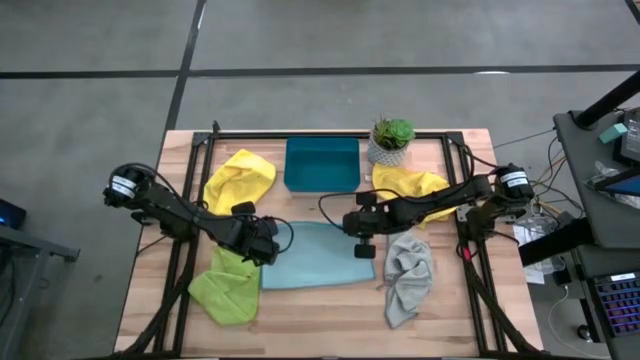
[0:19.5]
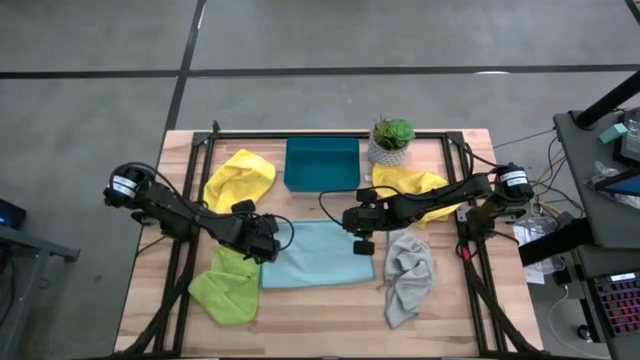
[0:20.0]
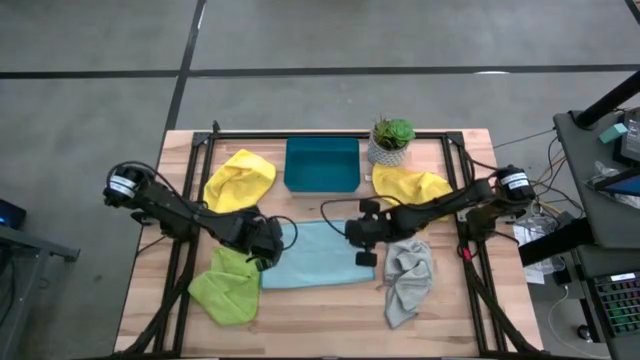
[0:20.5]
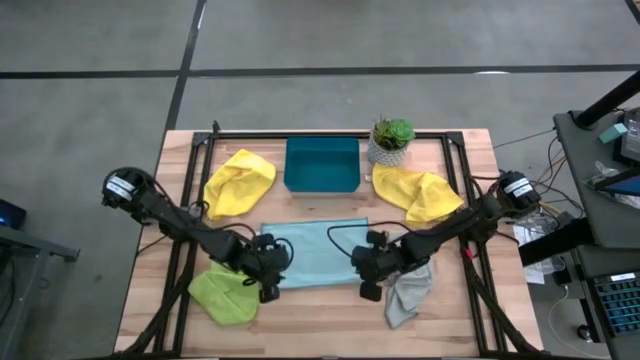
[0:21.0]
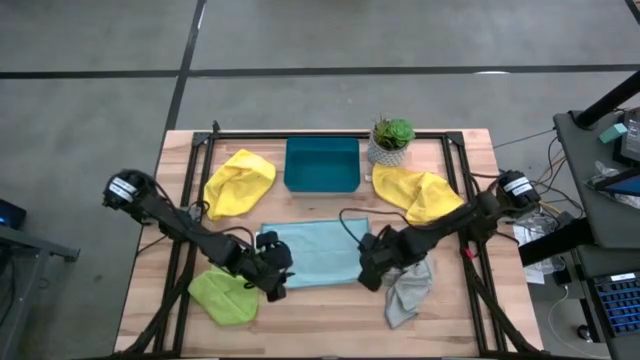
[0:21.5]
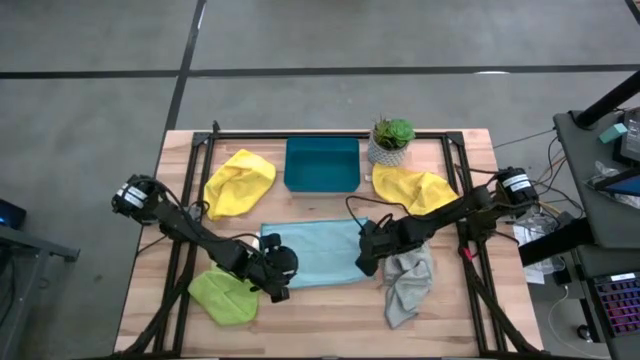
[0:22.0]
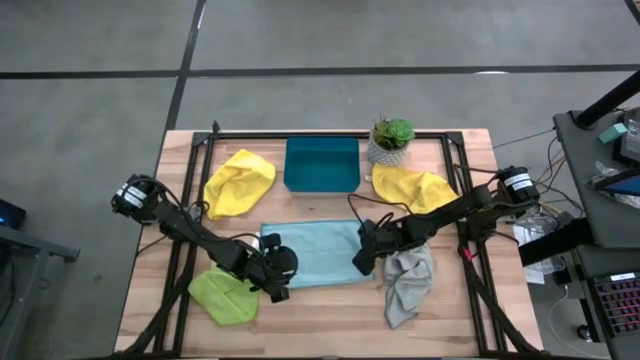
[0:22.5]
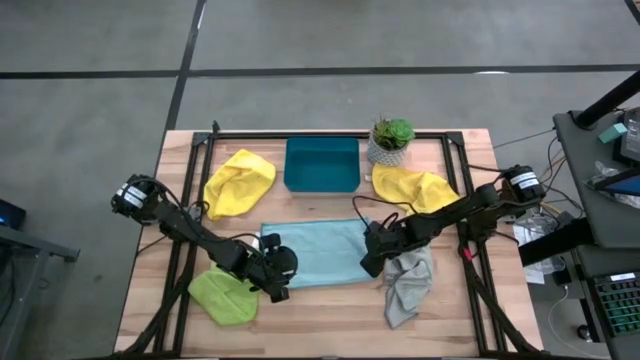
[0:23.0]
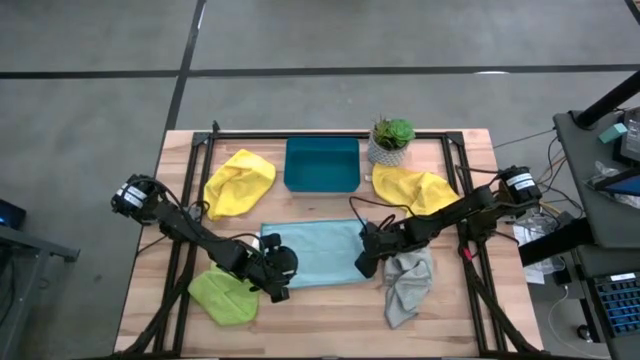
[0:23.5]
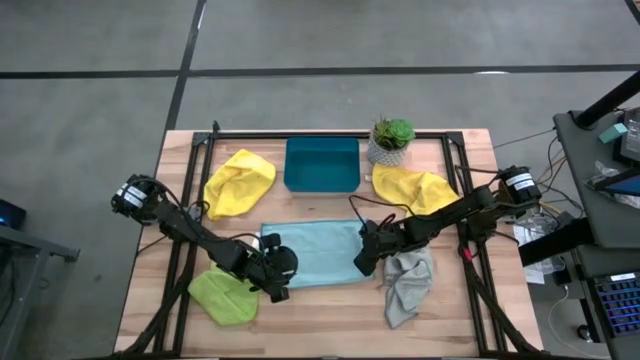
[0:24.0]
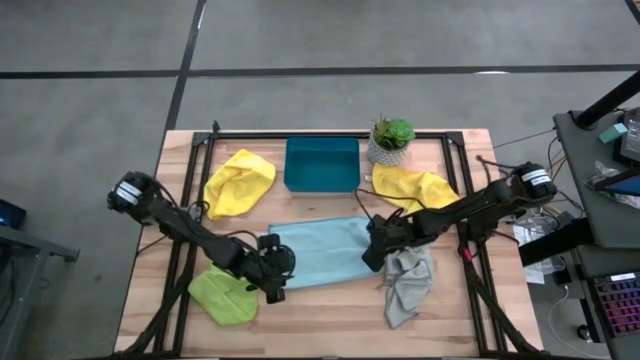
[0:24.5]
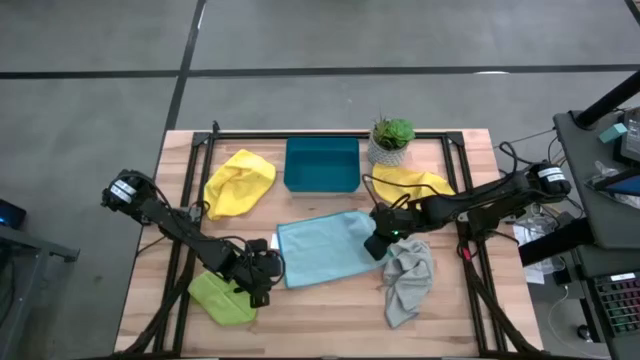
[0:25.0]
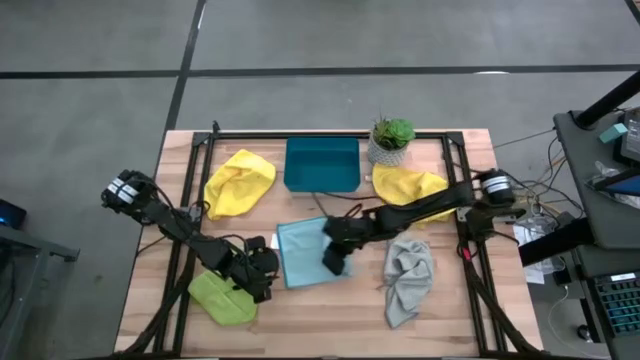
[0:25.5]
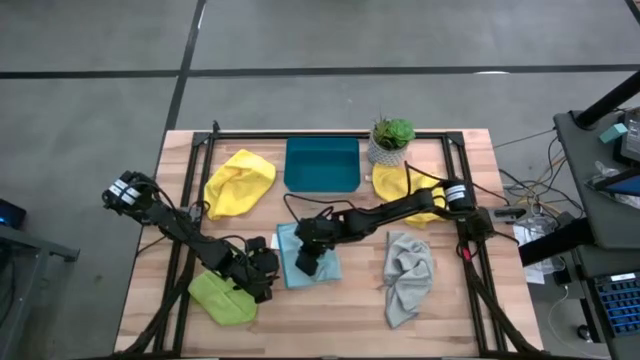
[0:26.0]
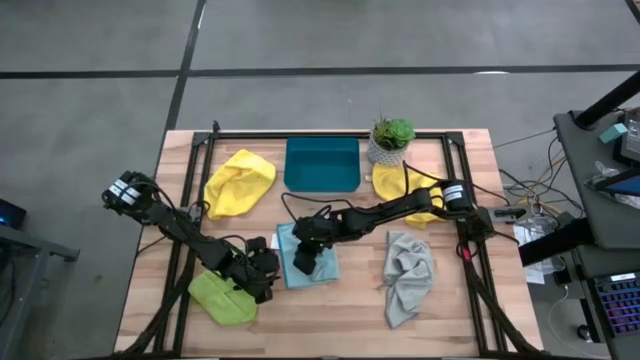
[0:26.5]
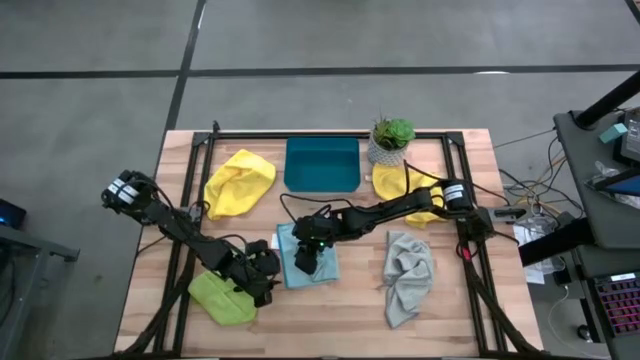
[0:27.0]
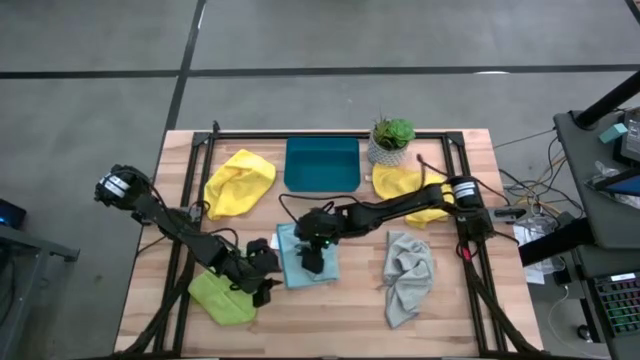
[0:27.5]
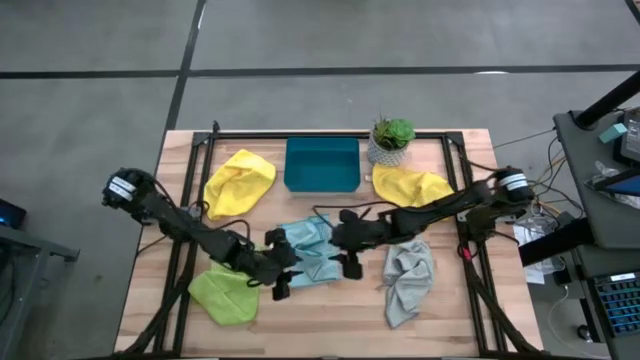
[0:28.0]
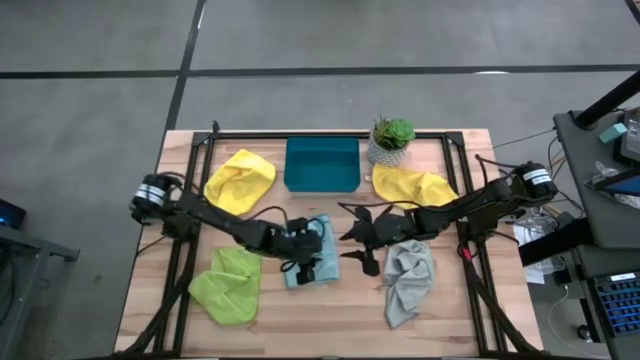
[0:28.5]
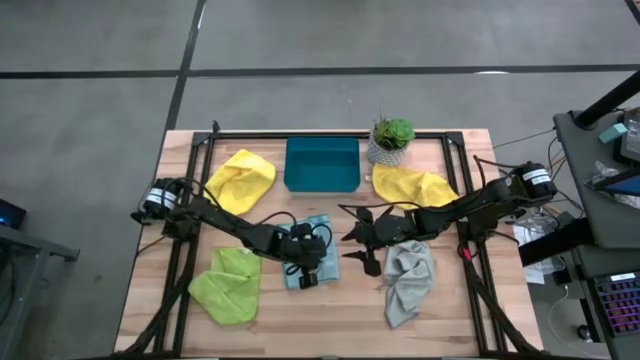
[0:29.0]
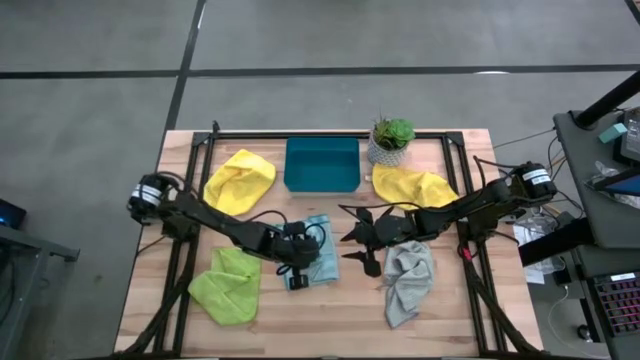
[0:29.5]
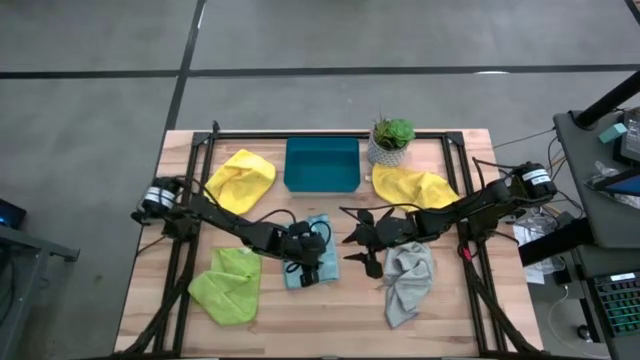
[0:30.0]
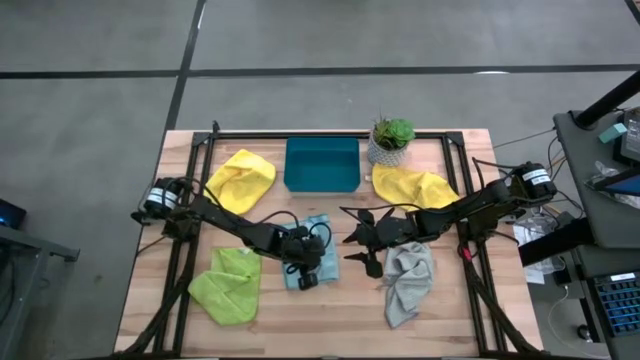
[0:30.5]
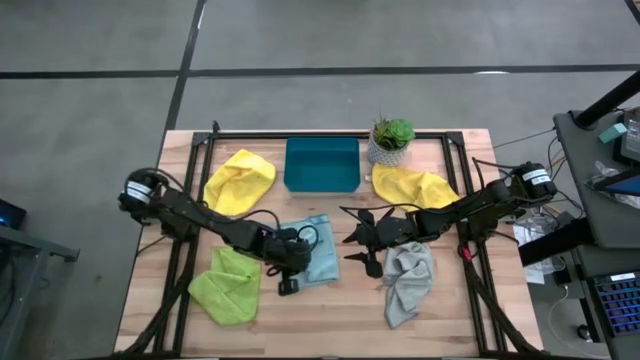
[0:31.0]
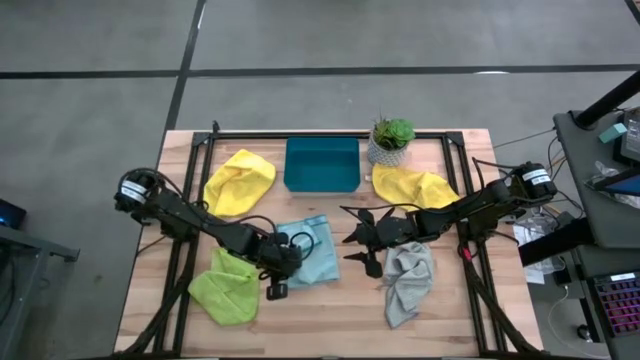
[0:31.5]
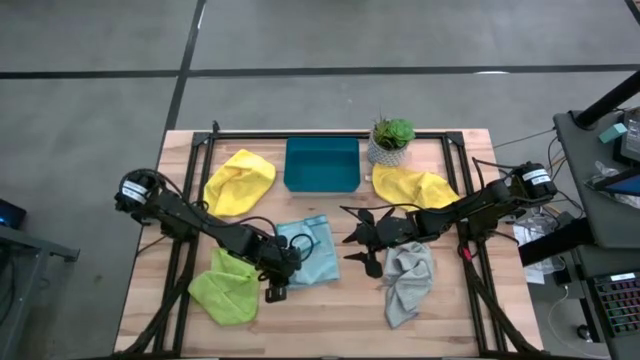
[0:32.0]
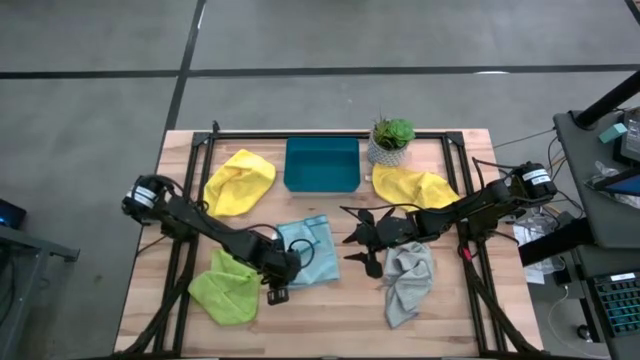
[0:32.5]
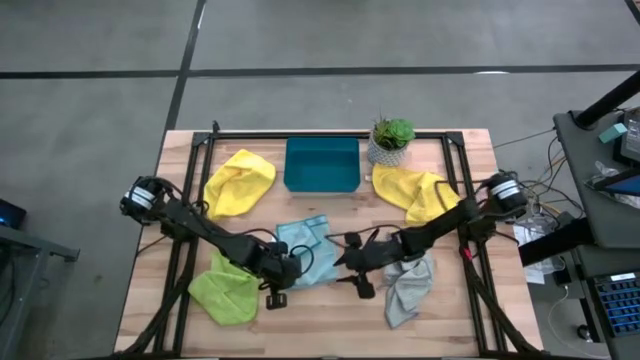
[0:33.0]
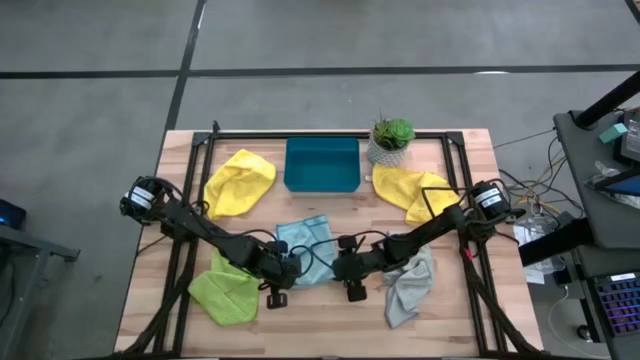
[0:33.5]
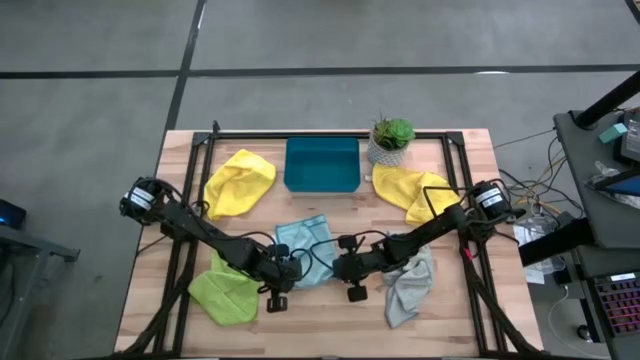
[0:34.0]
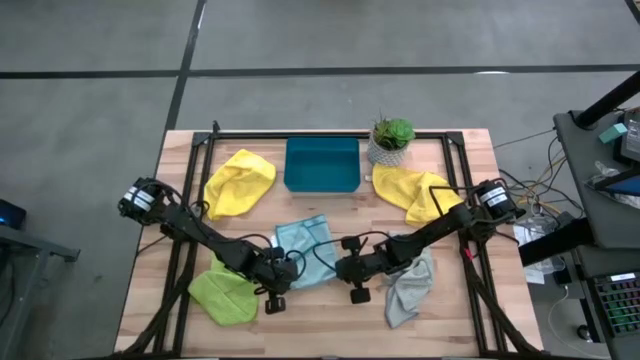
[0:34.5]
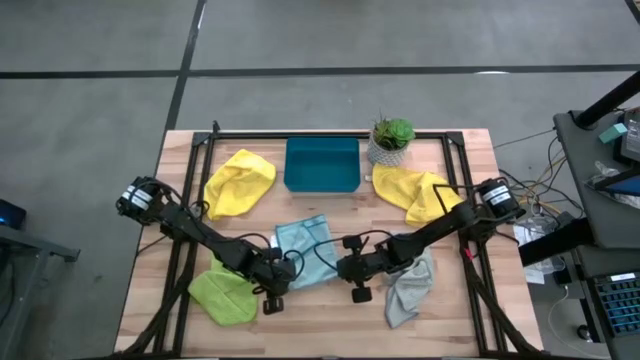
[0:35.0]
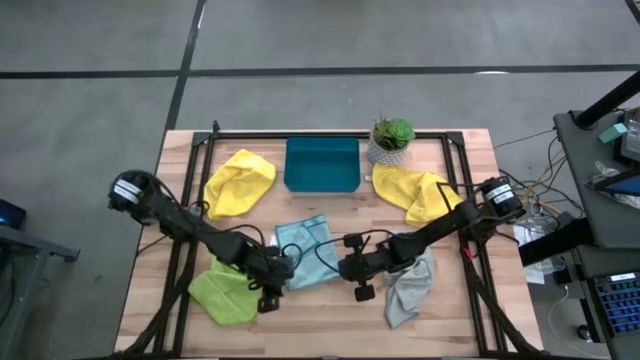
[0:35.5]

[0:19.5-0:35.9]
Task: Fold microfiber towels
Fold the blue microfiber cloth

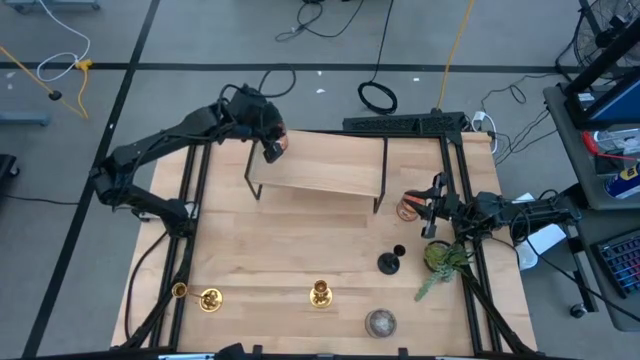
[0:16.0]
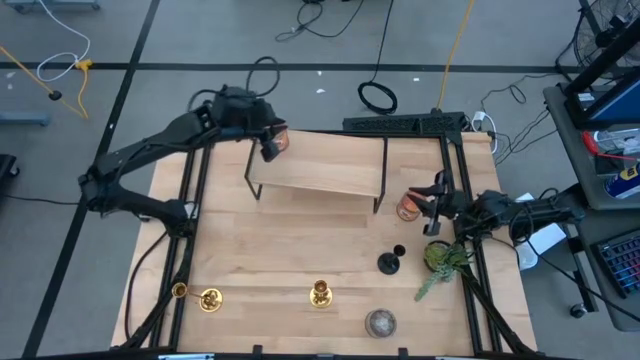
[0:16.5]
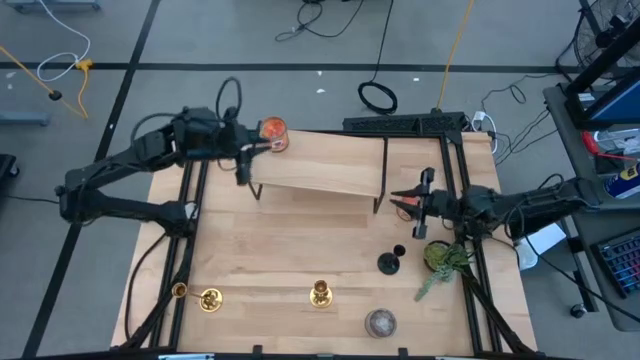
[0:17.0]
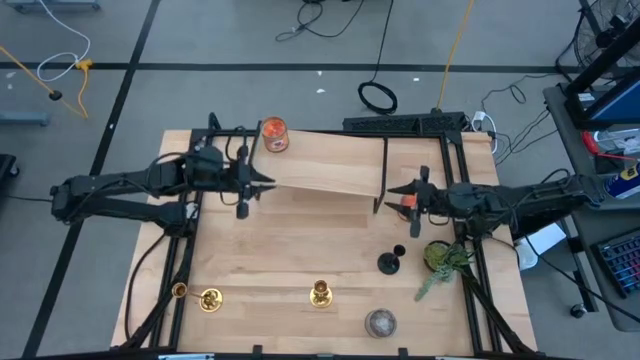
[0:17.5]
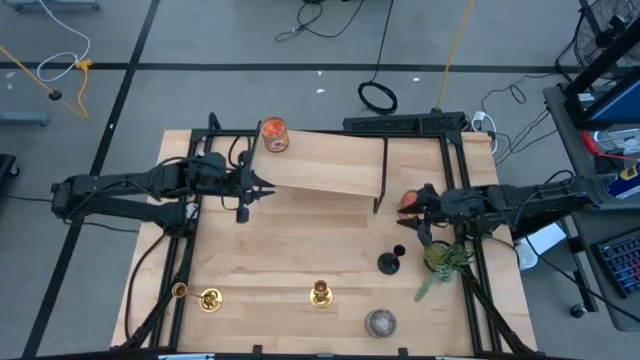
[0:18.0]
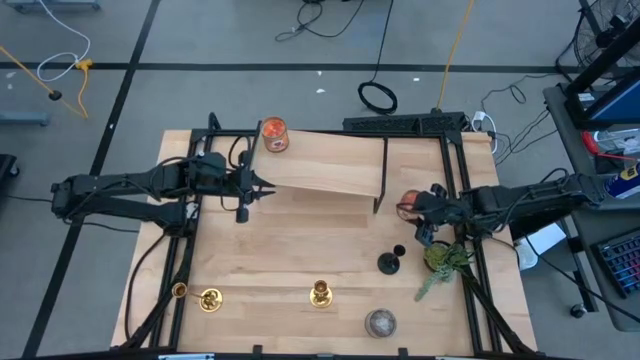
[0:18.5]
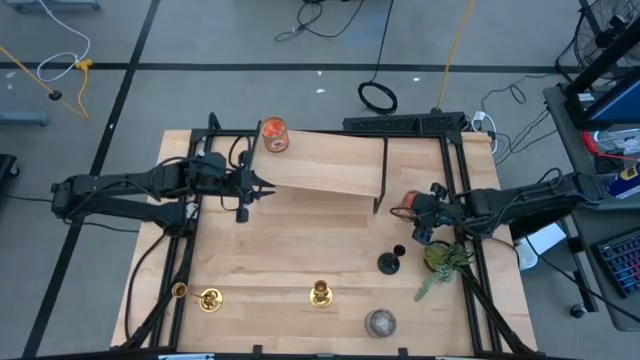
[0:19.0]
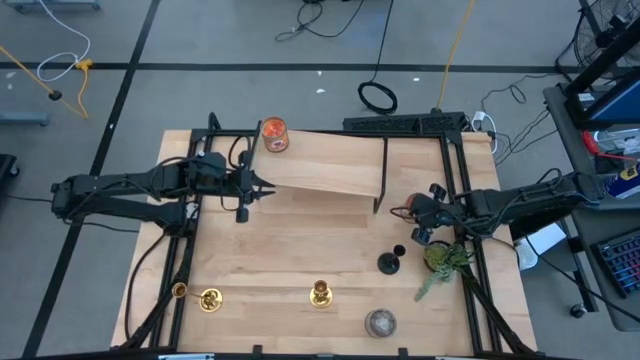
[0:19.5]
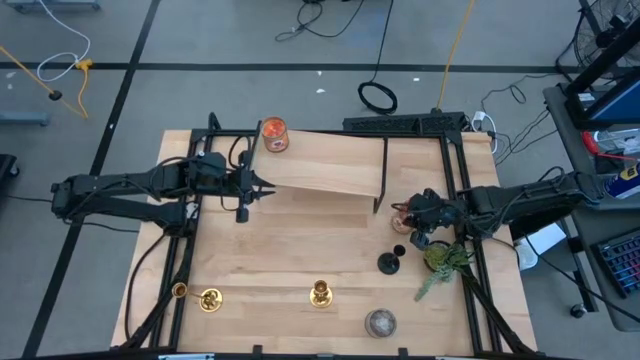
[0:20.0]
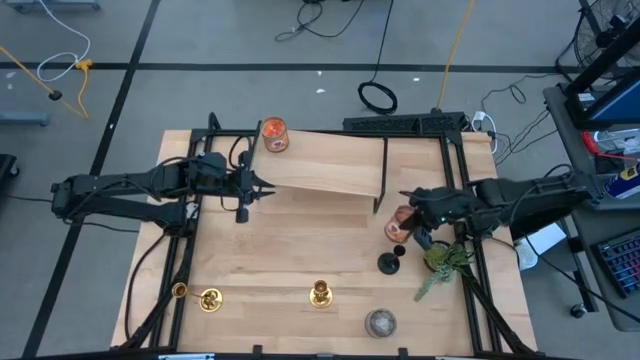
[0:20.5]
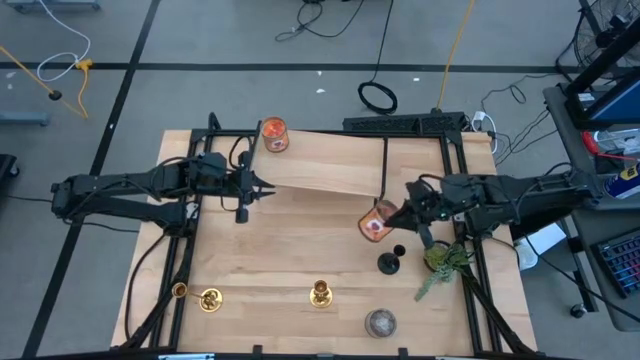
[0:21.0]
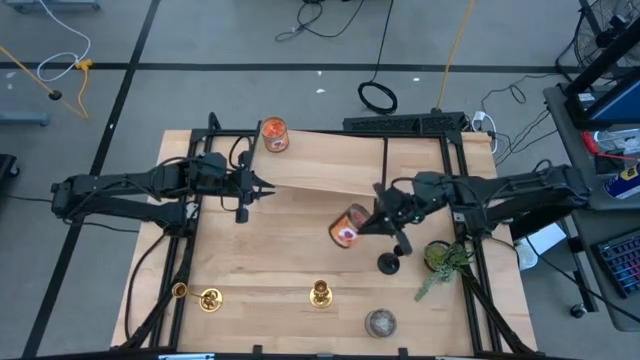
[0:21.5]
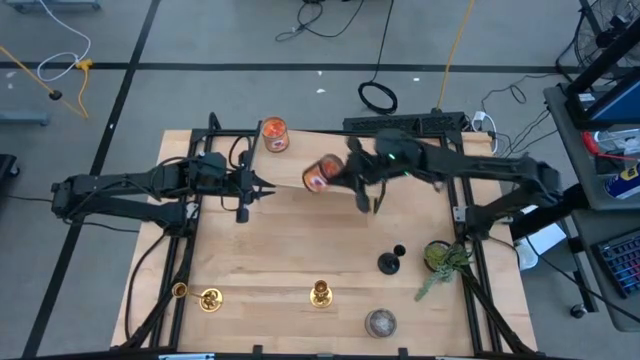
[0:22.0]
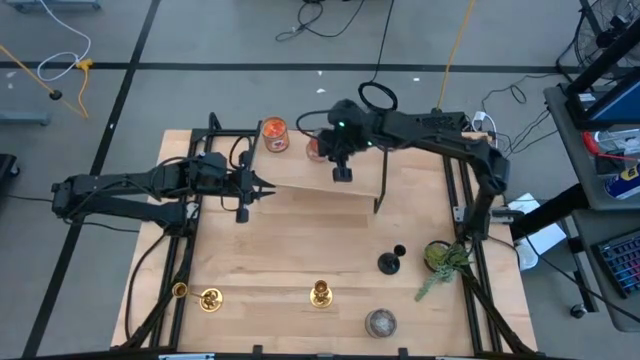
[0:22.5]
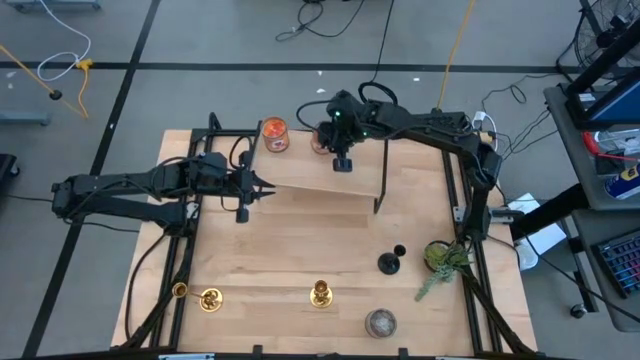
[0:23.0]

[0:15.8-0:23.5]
Task: Pick & Place candle stick holders
Put the orange scented candle on the shelf
